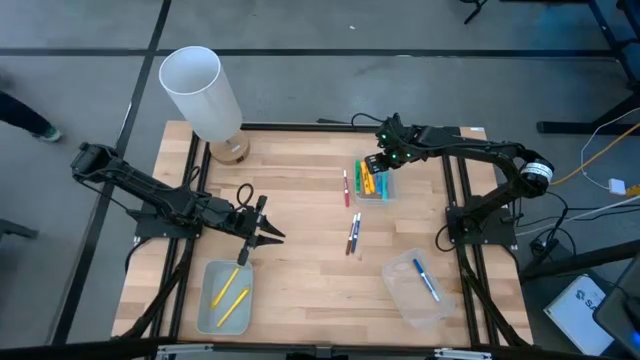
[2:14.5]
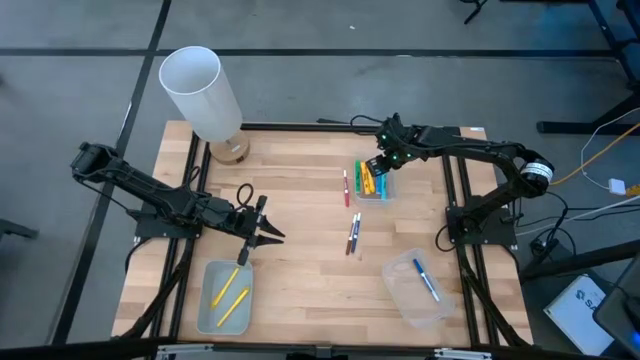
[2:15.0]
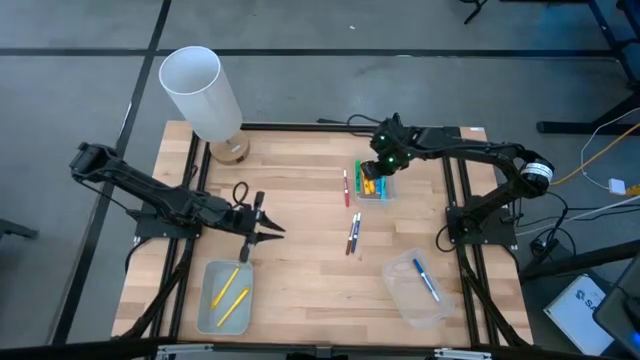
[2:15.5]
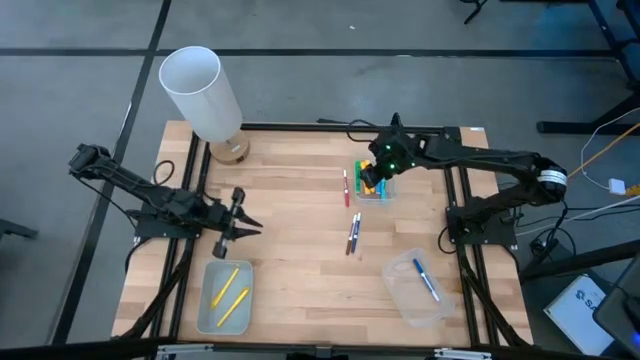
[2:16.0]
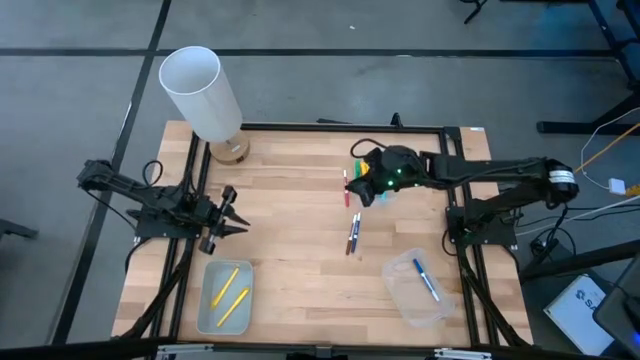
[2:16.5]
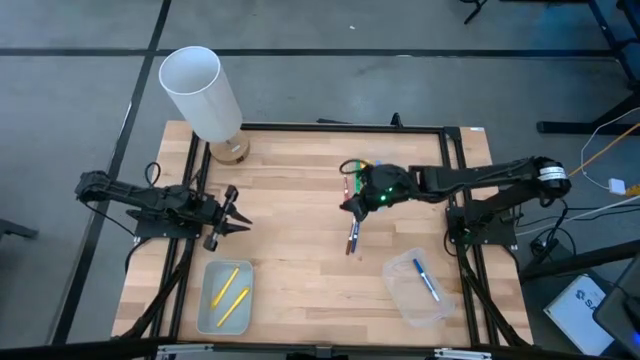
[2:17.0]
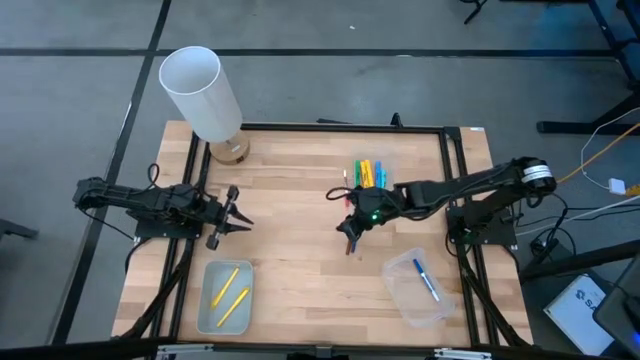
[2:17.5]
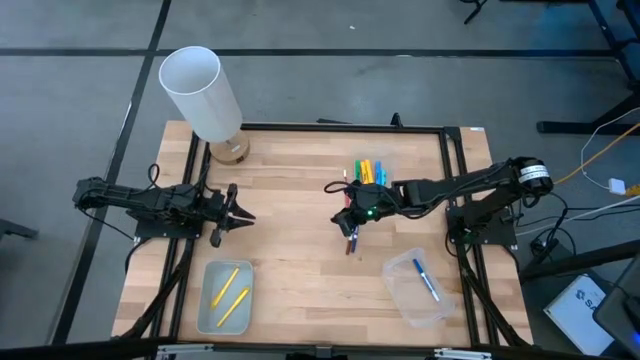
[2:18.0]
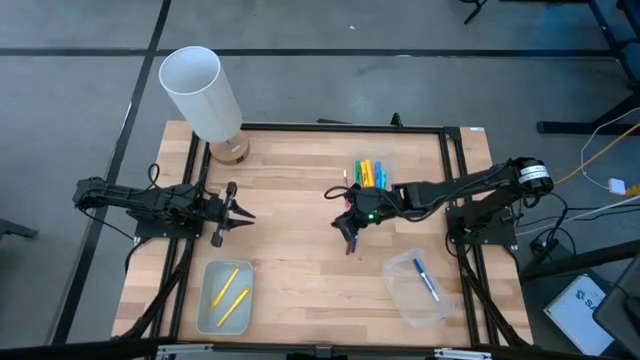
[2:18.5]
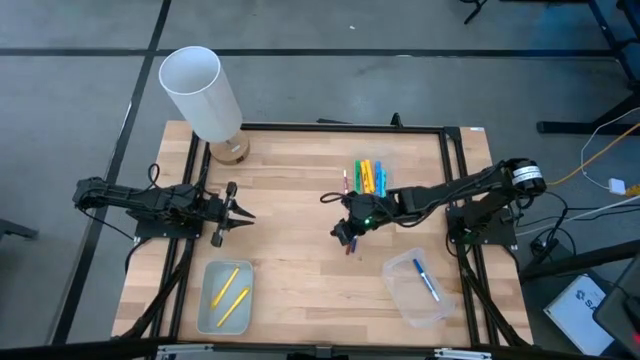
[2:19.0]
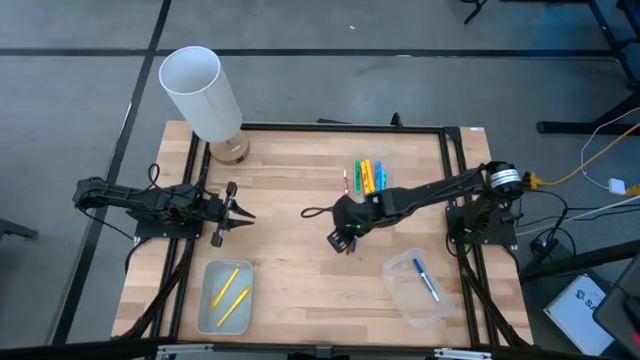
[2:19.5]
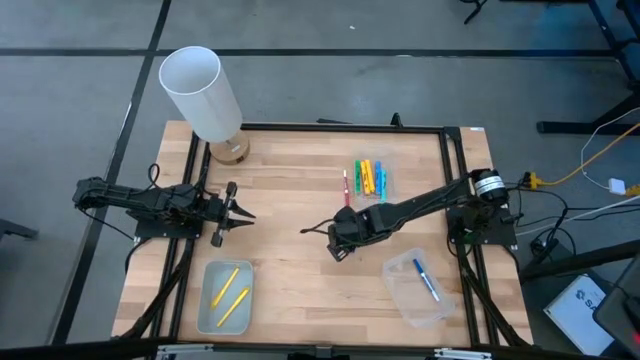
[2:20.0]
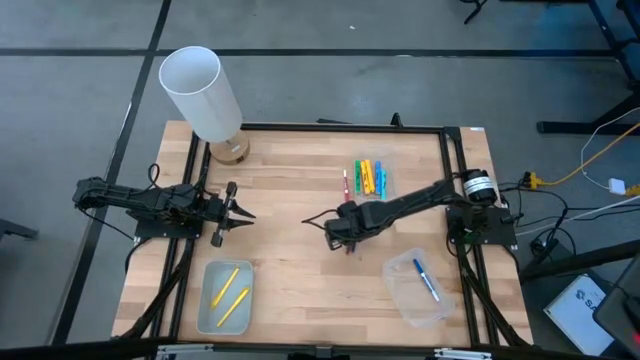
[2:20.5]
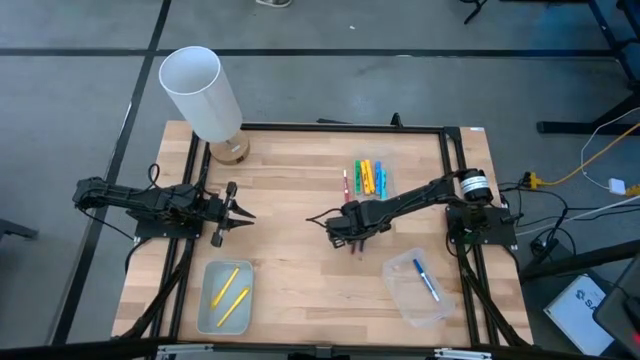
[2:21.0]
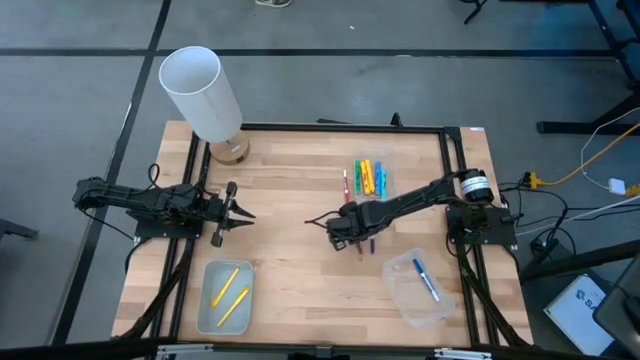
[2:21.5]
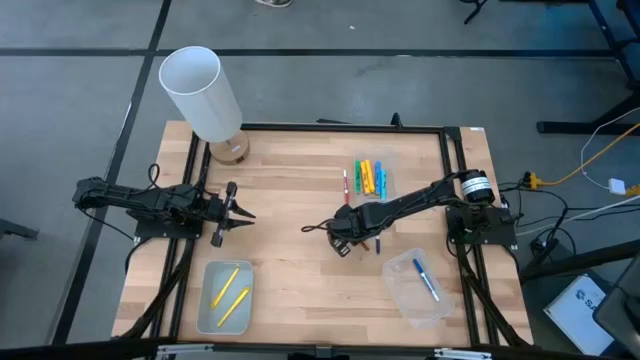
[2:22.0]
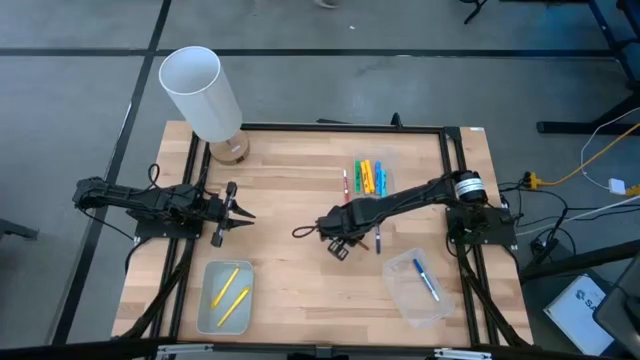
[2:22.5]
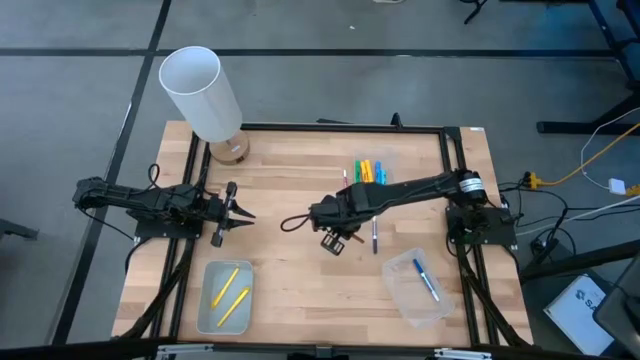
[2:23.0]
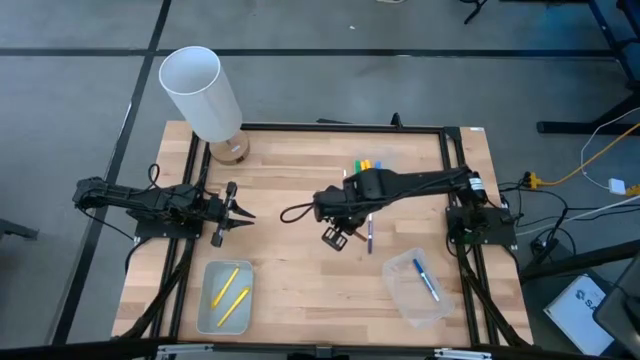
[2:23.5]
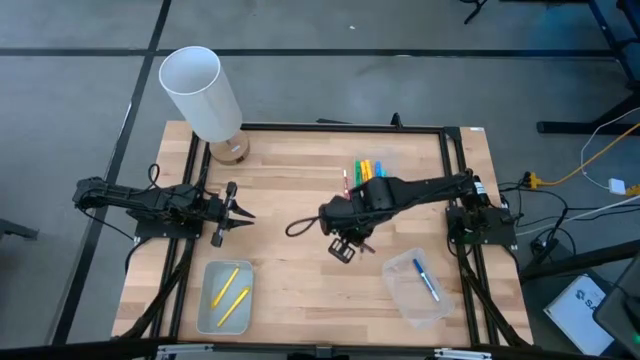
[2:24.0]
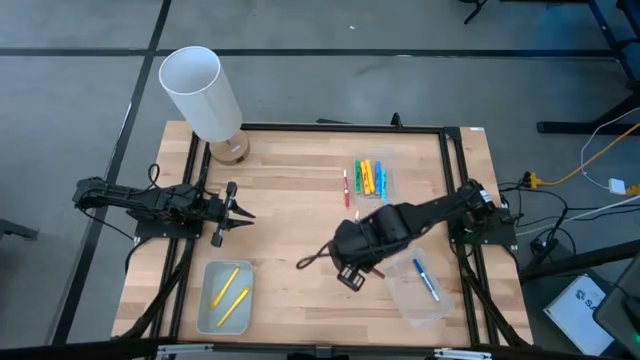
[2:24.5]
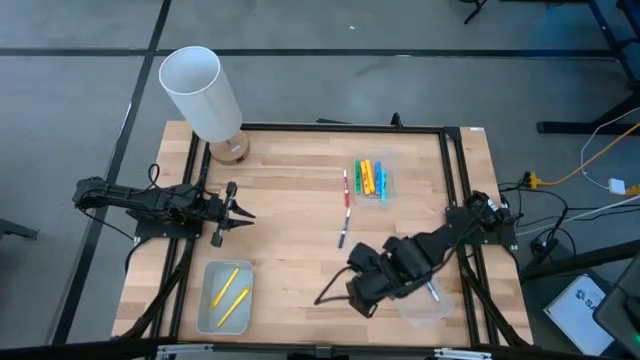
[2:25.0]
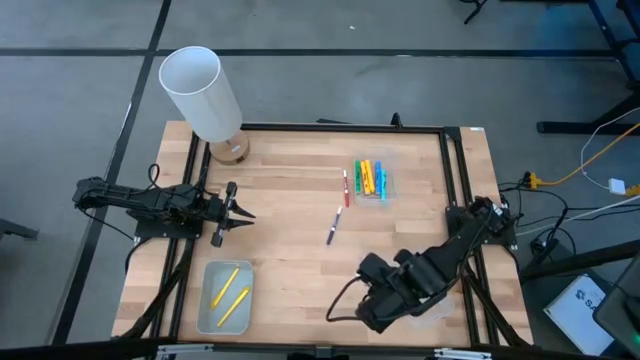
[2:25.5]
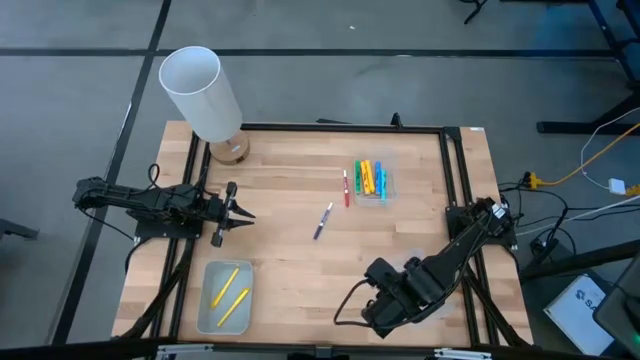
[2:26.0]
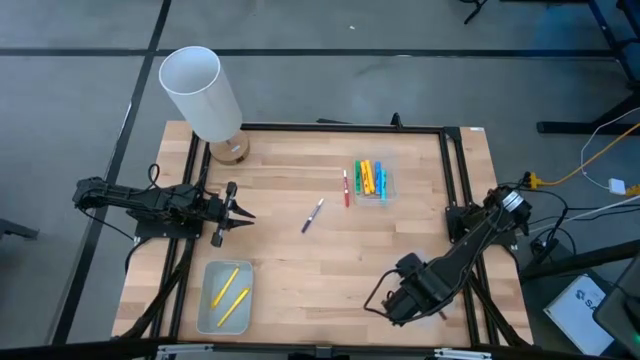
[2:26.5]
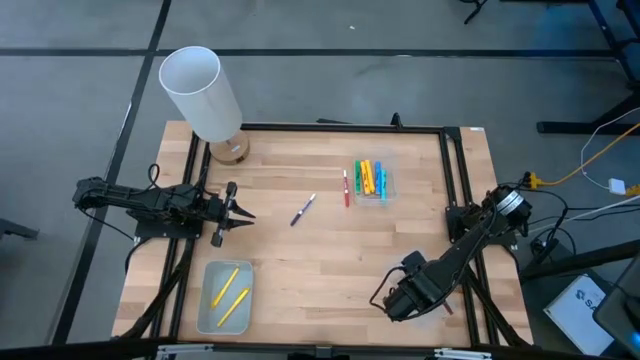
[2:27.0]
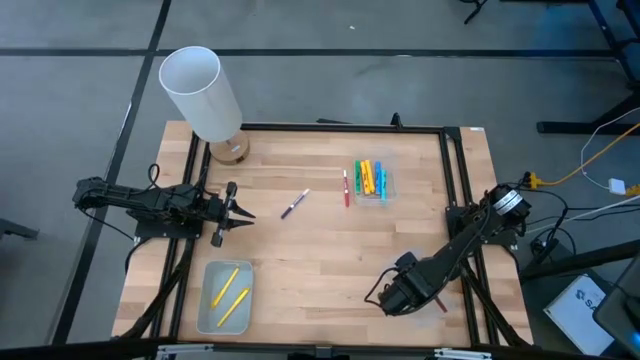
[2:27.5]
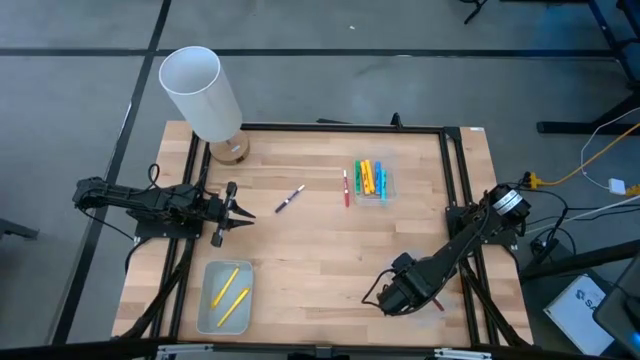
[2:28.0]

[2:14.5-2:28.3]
Task: Pick & Place Markers
Put the brown marker pen into the bottom transparent bin

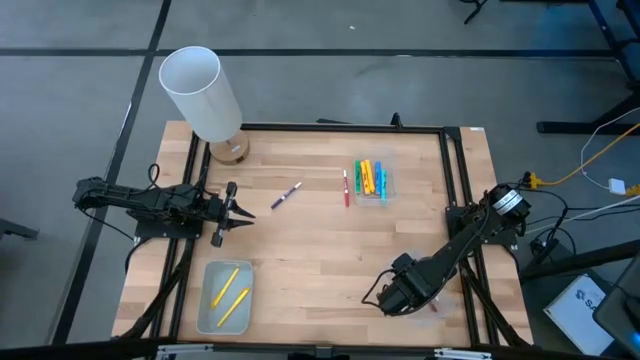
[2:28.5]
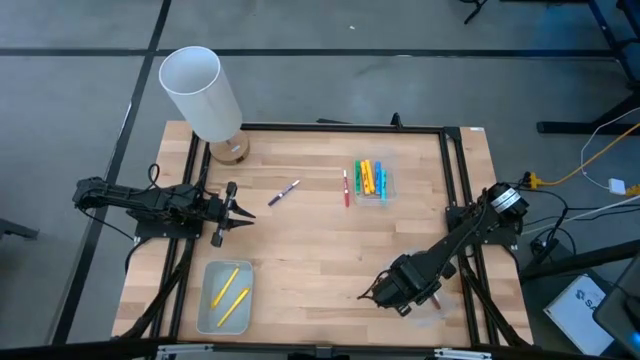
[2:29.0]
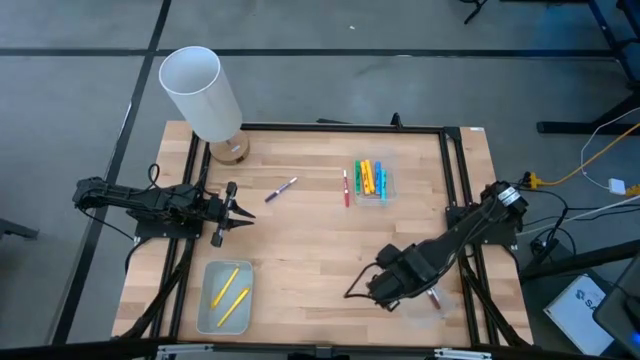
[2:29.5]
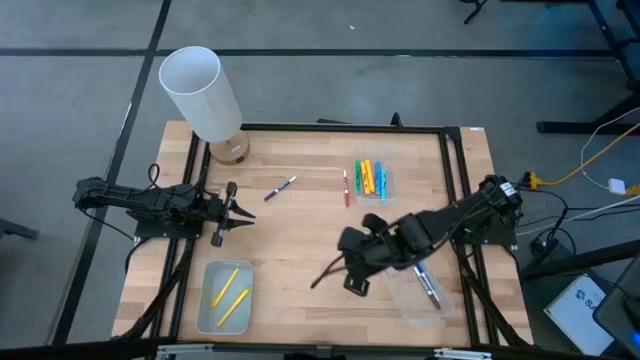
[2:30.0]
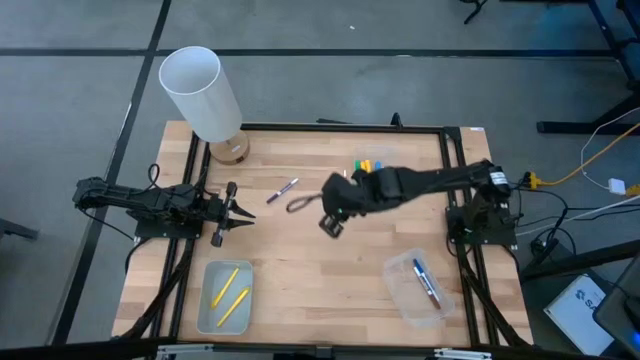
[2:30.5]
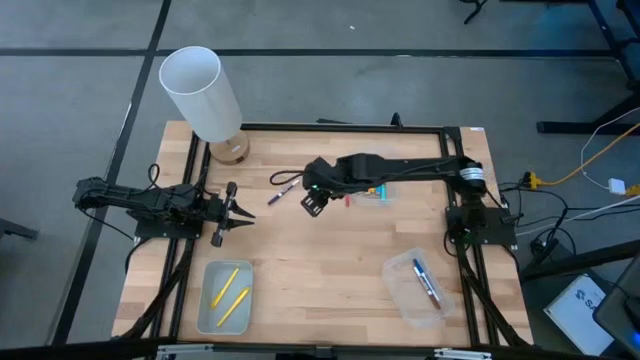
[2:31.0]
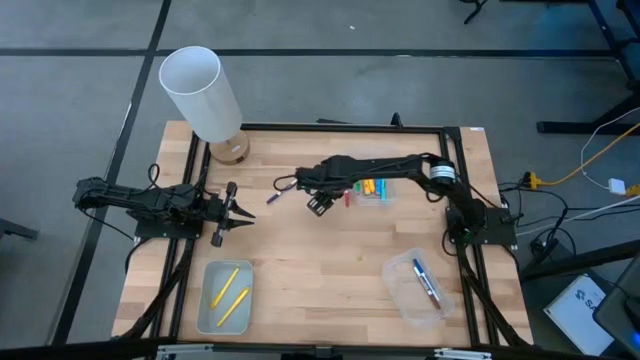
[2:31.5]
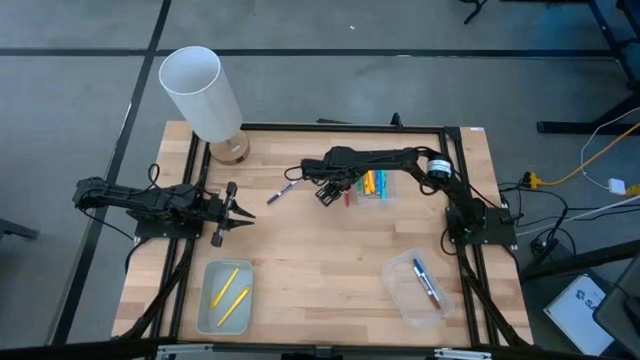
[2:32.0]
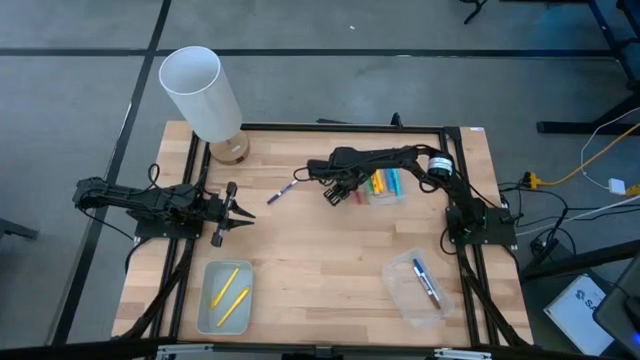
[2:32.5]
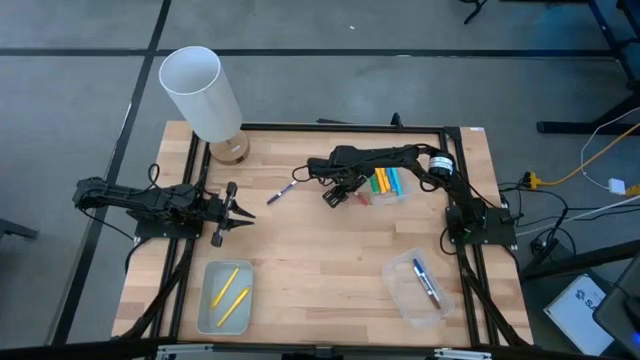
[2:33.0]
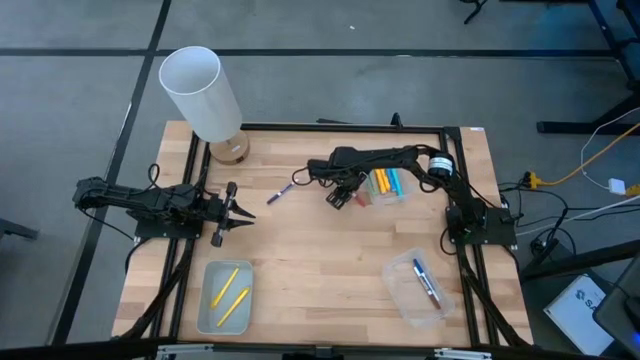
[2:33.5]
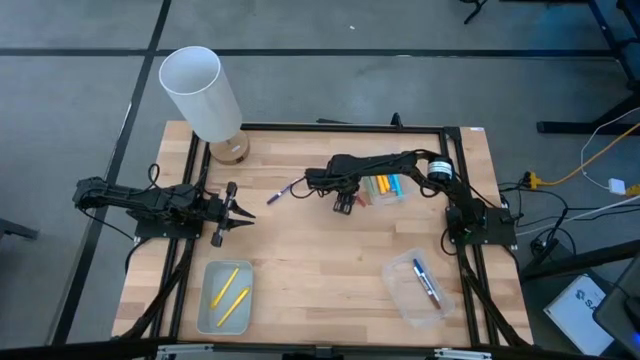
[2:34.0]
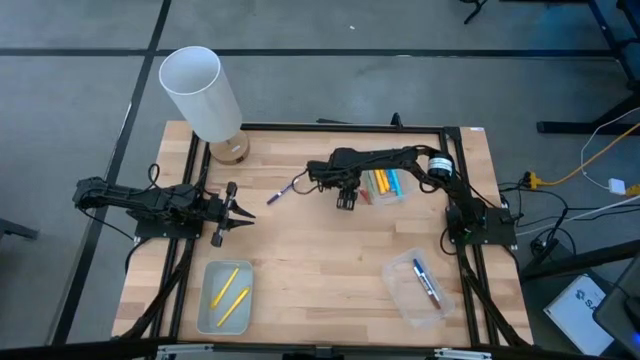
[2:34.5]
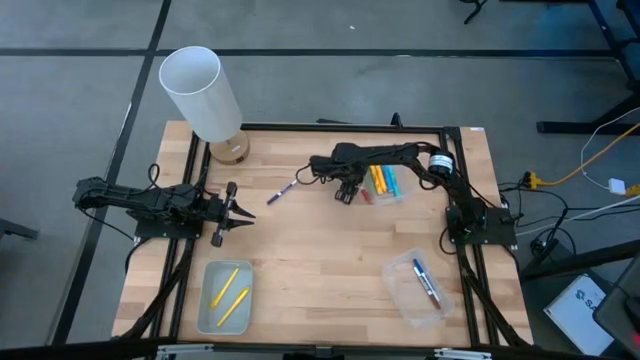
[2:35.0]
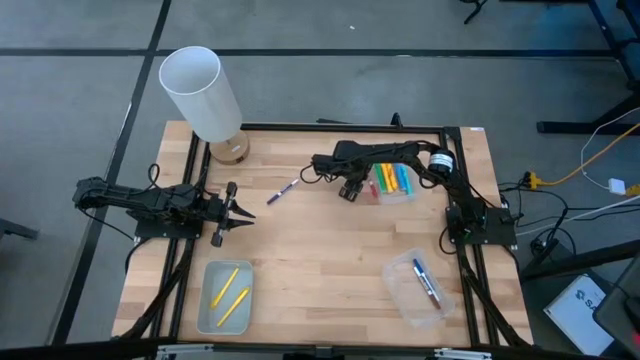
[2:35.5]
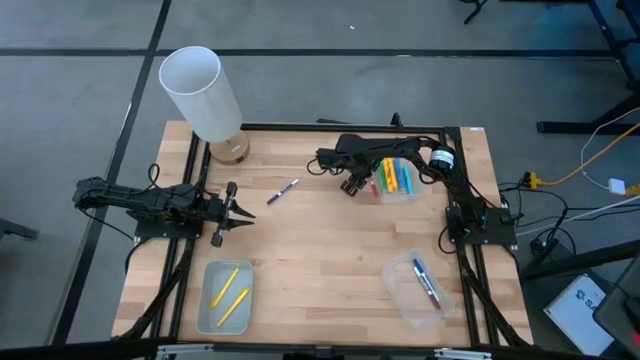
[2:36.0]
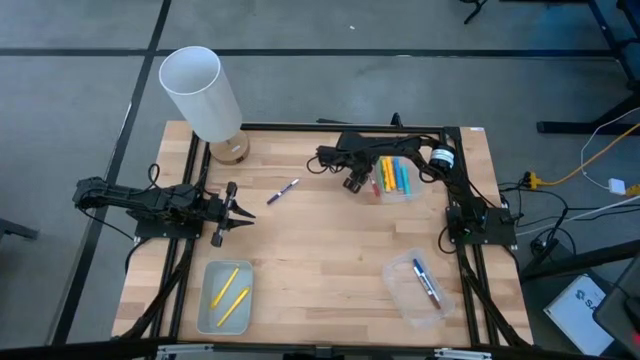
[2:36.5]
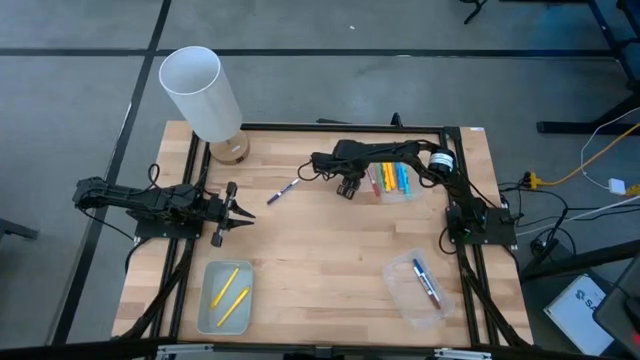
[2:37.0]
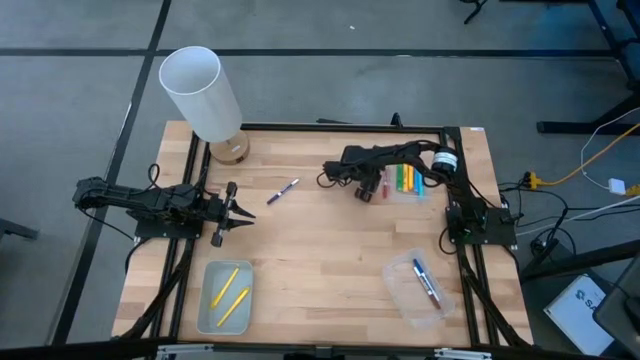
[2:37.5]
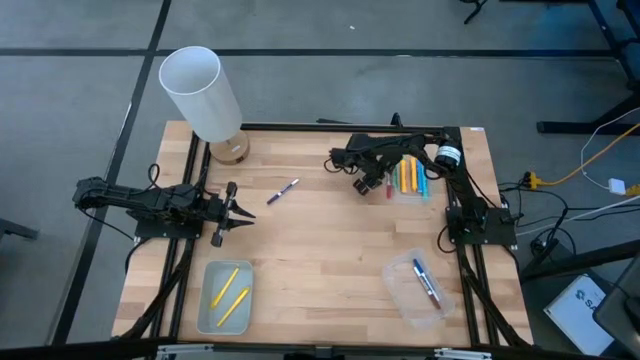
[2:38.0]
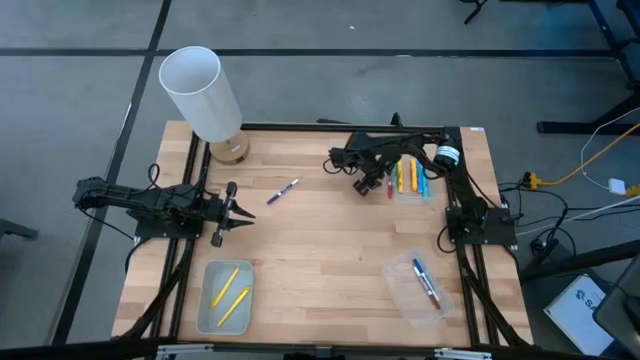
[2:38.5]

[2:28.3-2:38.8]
Put the pink marker pen into the bottom transparent bin
